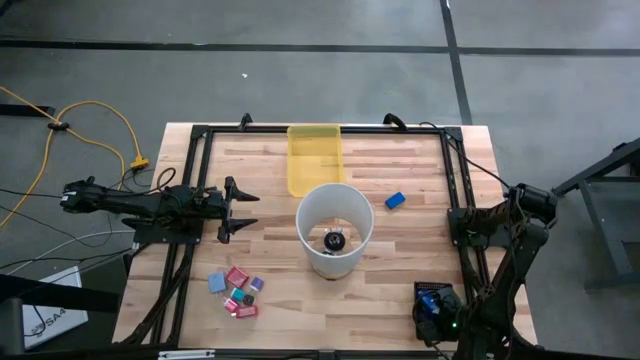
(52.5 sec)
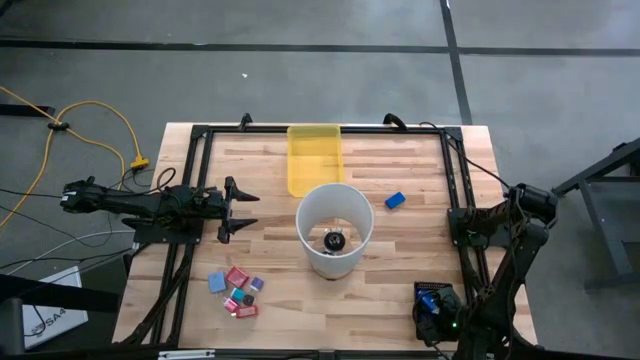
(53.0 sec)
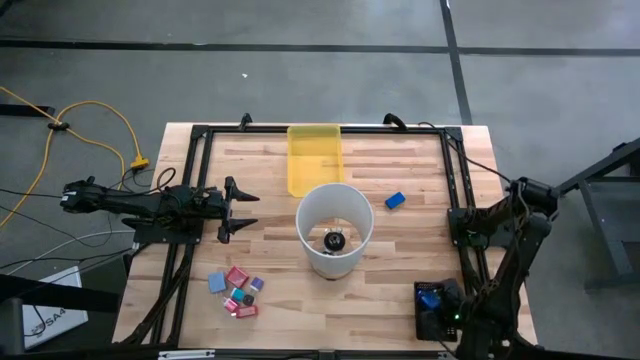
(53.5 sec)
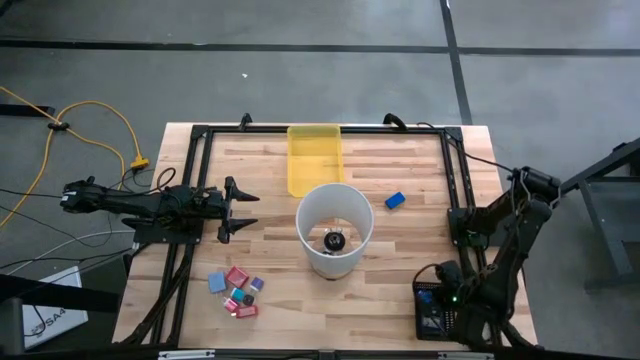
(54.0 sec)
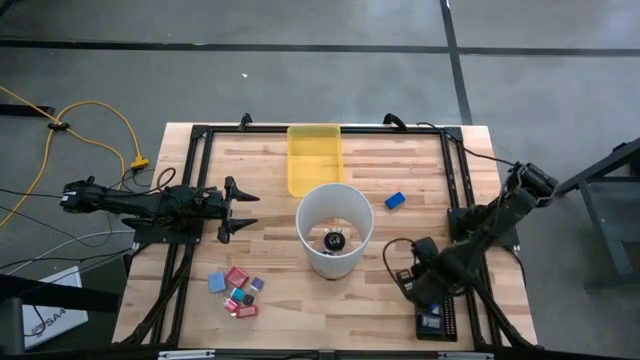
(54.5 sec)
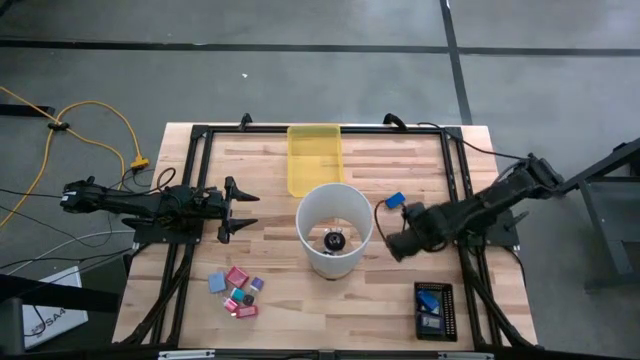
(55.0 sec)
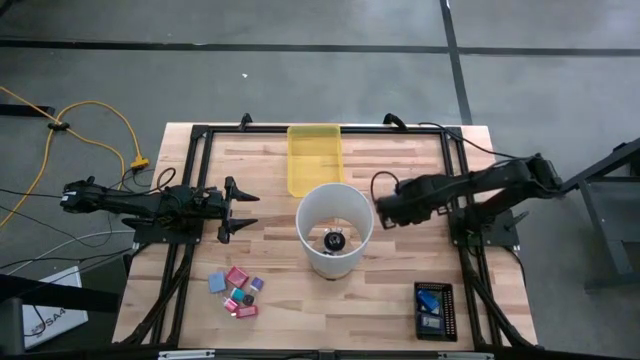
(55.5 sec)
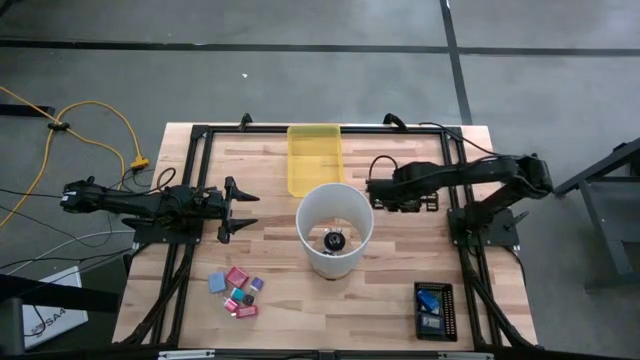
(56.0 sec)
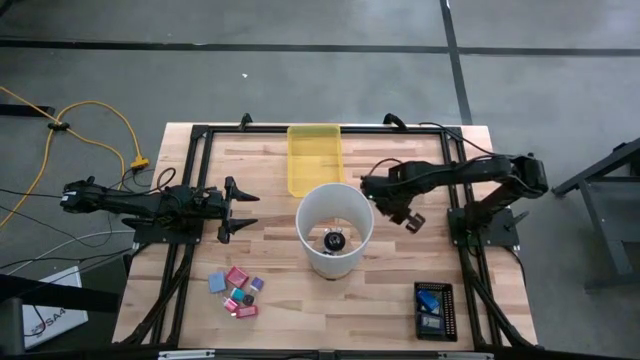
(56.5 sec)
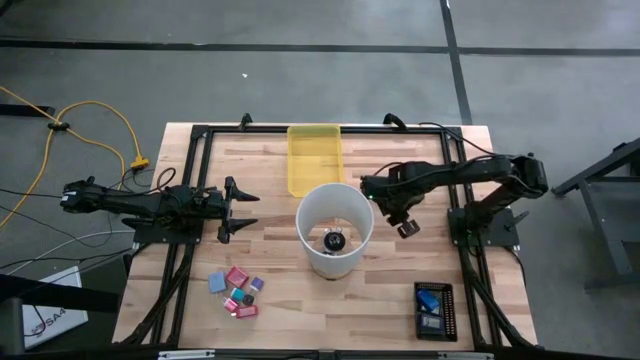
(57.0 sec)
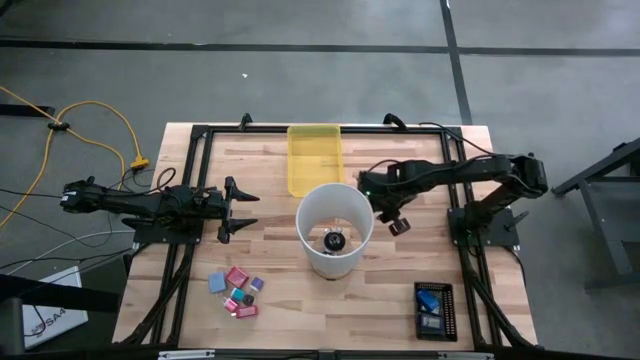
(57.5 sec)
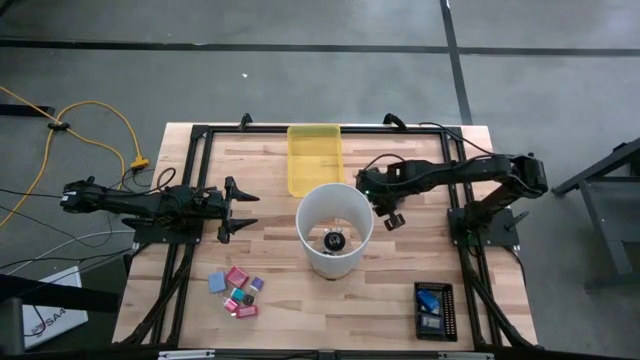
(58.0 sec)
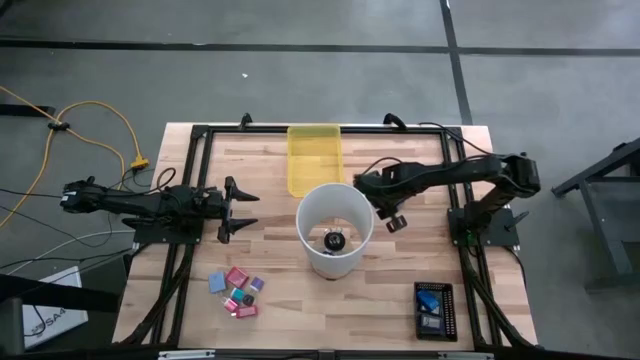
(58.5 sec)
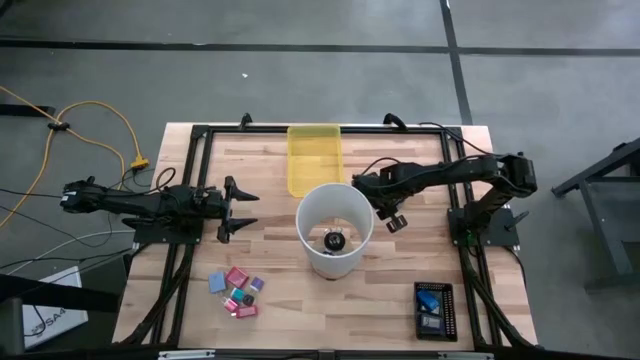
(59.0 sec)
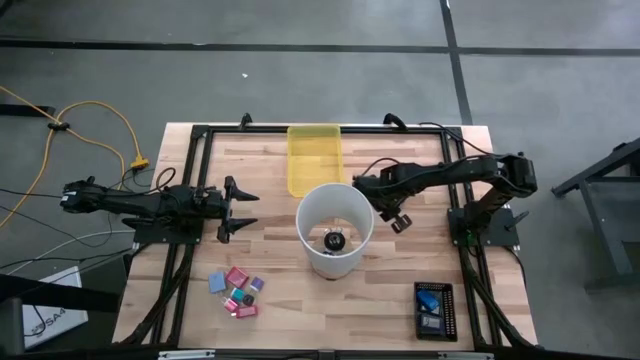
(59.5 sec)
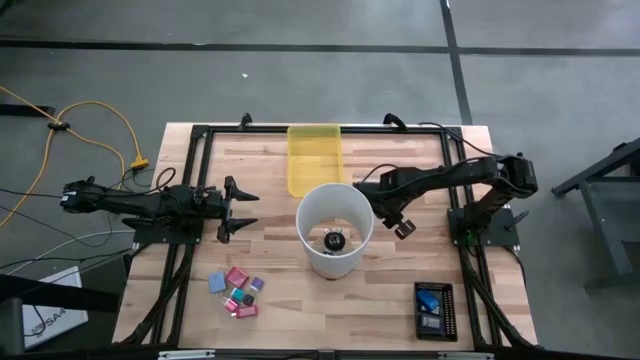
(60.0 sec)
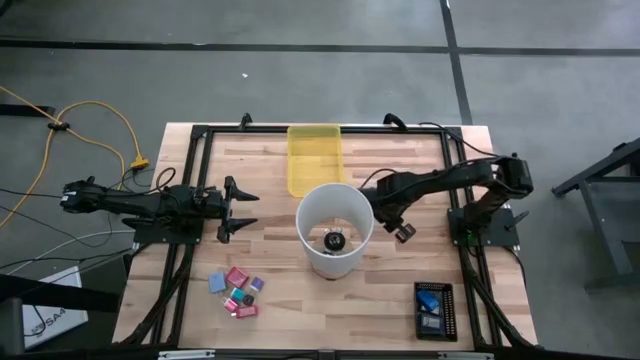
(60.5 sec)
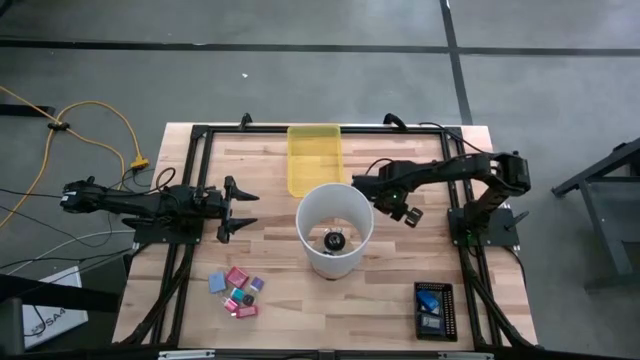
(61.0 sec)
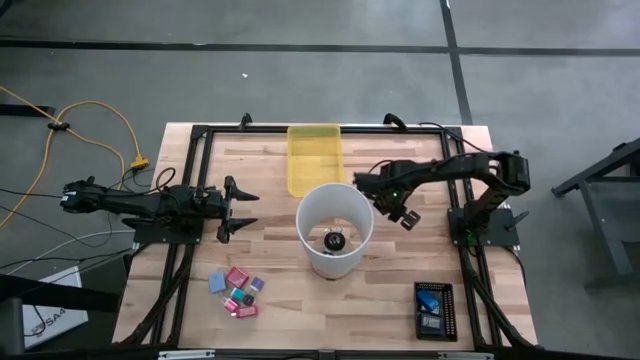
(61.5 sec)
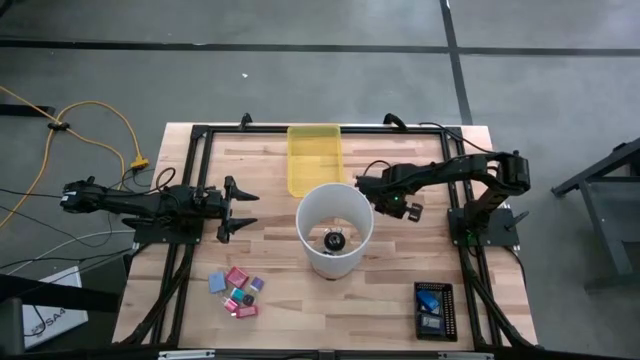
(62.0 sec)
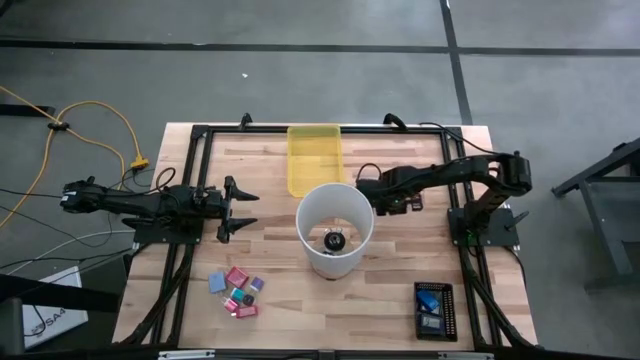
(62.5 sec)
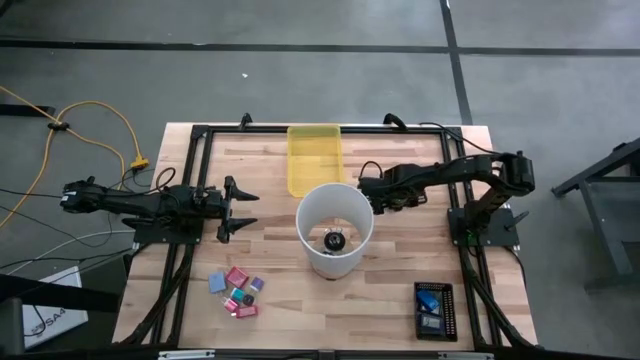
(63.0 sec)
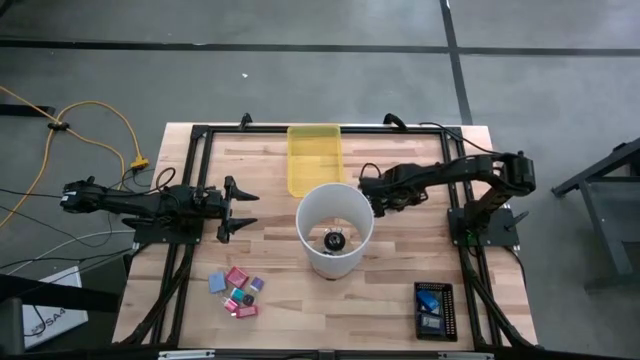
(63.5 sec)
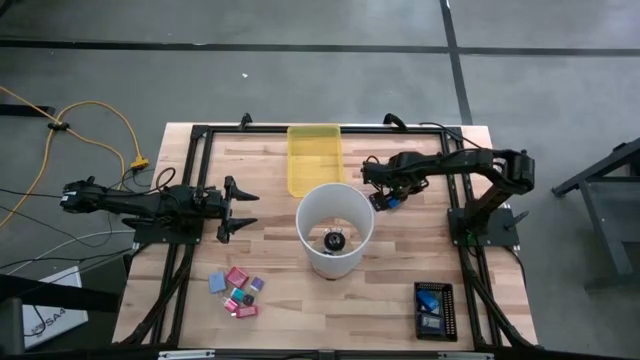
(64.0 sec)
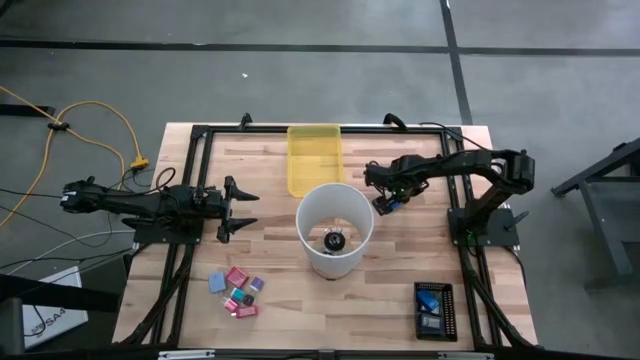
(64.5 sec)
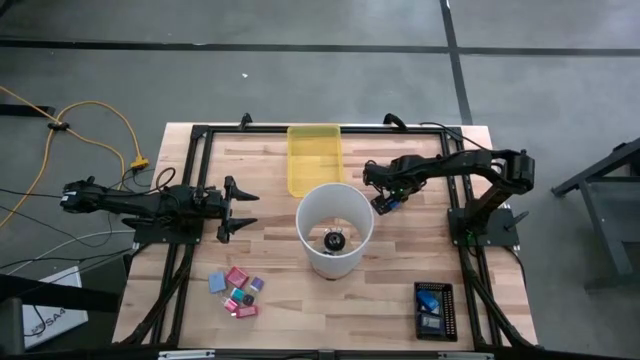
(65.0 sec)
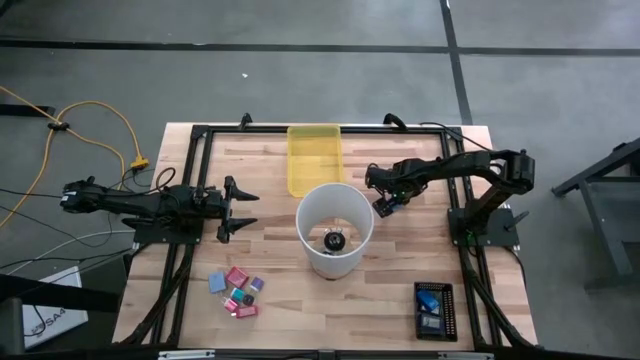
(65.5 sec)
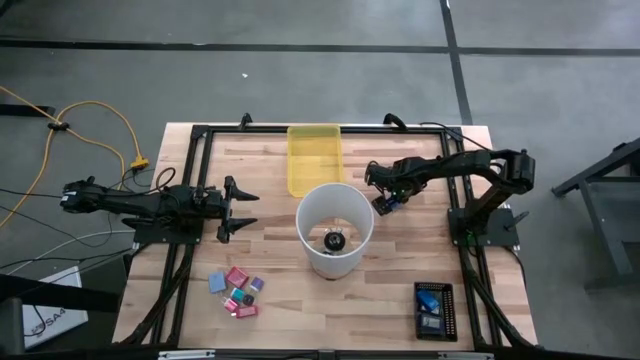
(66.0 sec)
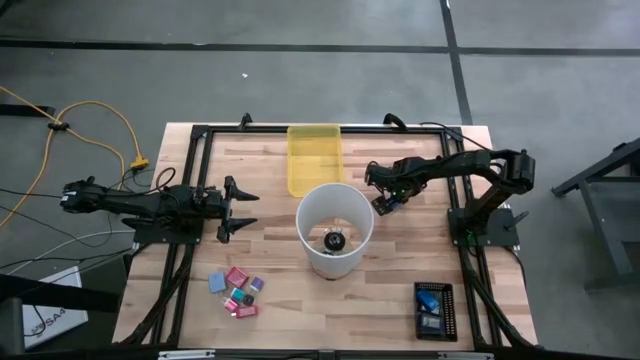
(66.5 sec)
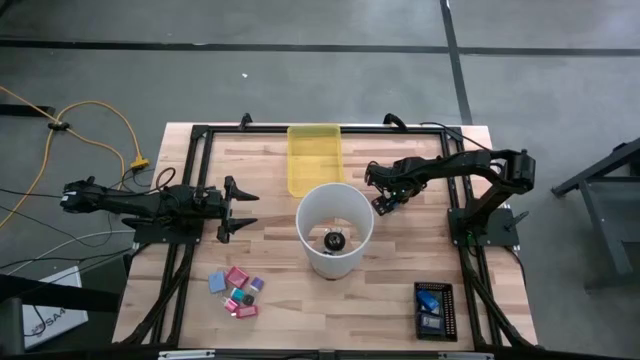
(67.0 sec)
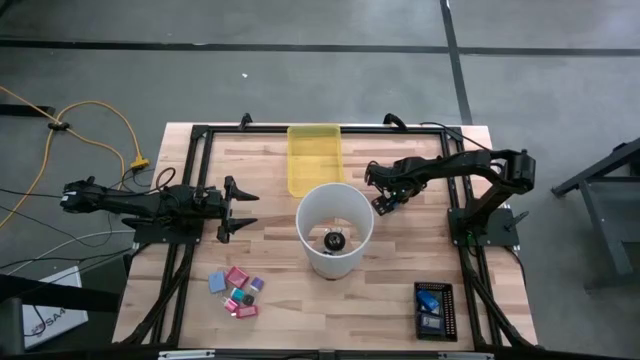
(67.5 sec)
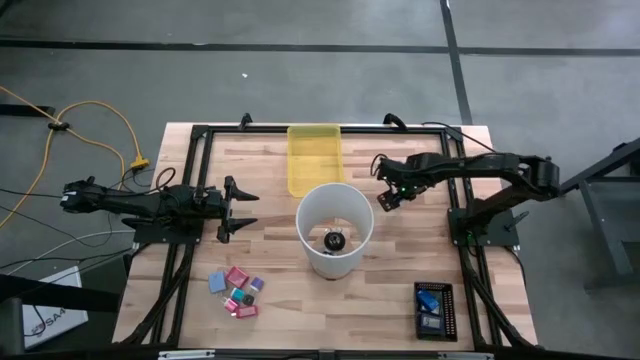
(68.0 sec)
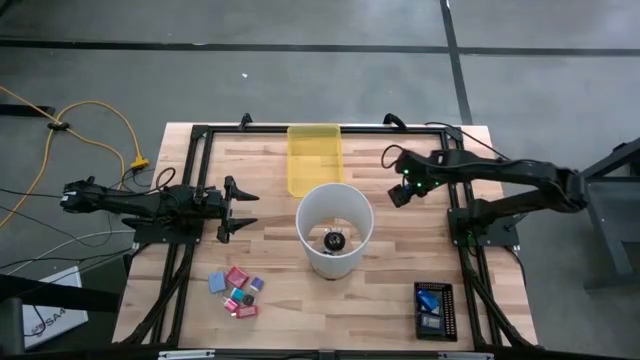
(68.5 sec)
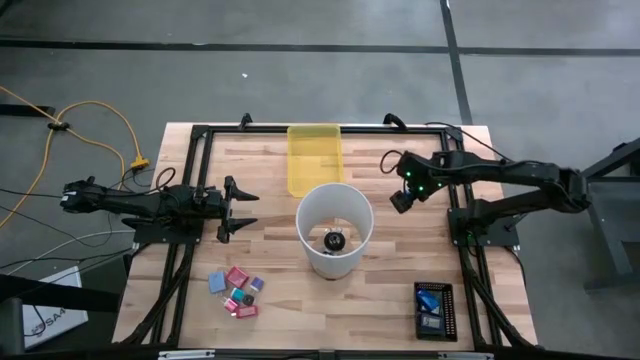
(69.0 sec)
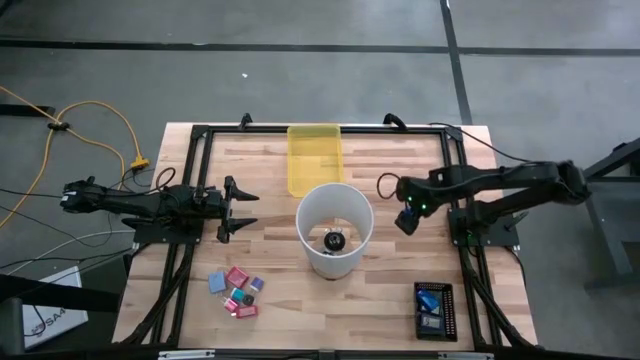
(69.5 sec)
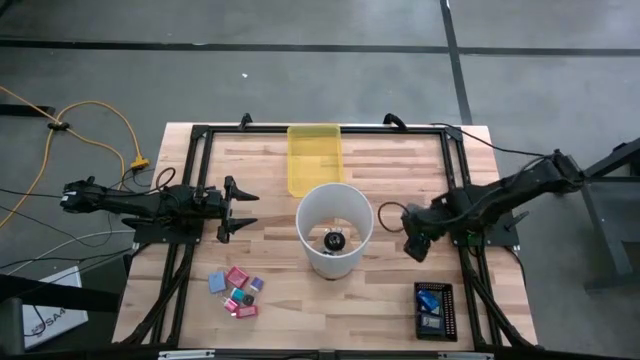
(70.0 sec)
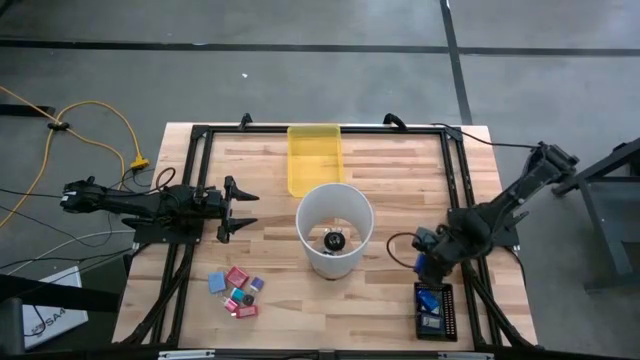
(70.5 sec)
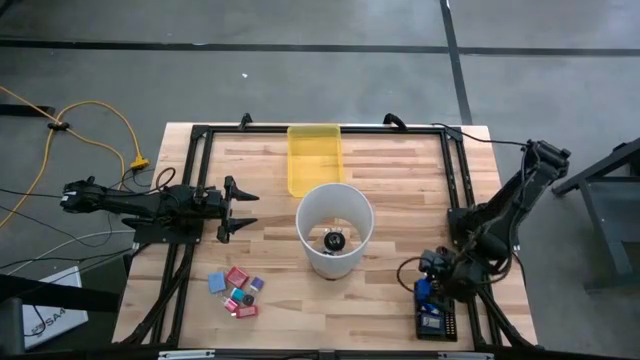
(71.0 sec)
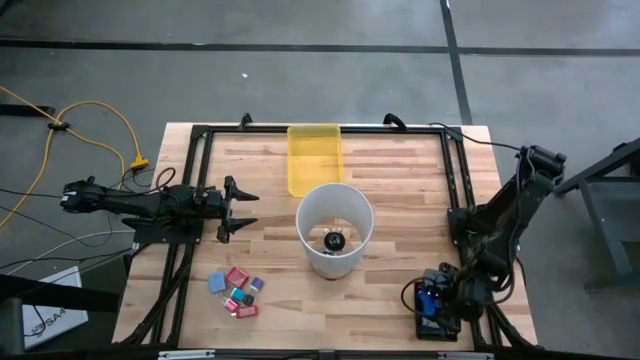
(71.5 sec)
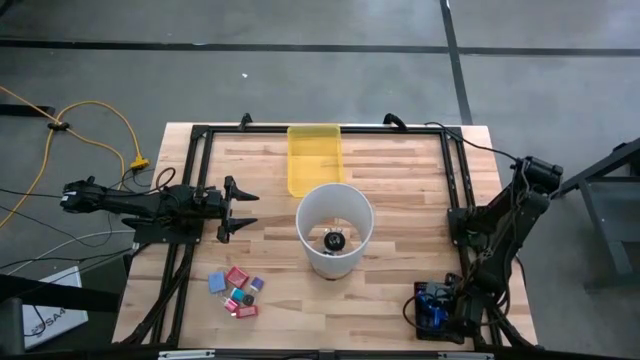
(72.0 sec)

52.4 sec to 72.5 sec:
Task: Pick & Place Office items
Put the blue timer into the black bin
